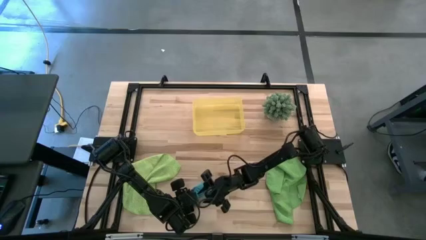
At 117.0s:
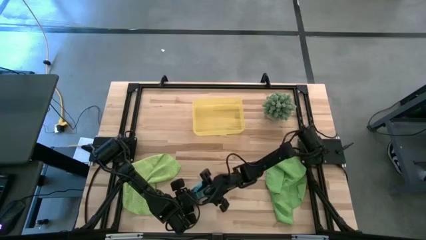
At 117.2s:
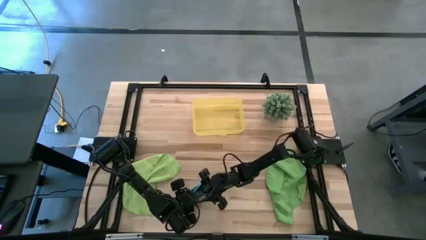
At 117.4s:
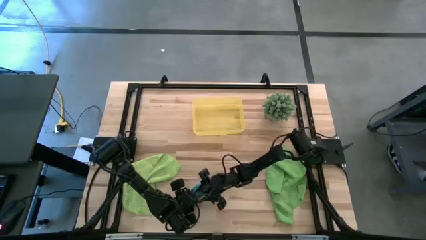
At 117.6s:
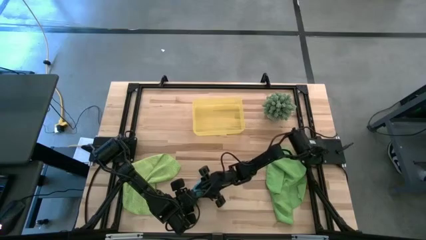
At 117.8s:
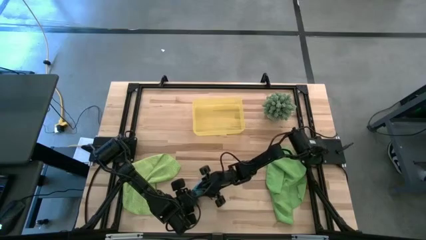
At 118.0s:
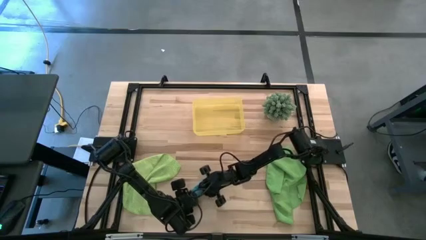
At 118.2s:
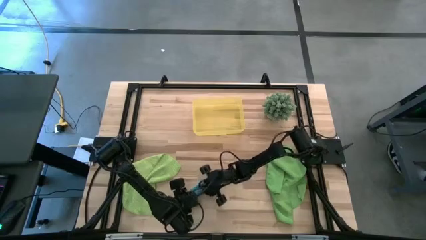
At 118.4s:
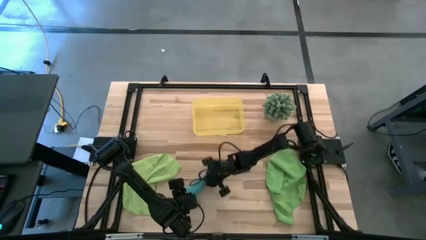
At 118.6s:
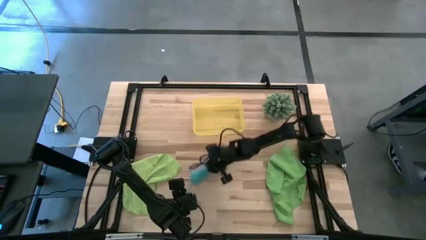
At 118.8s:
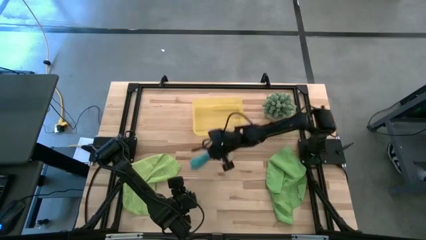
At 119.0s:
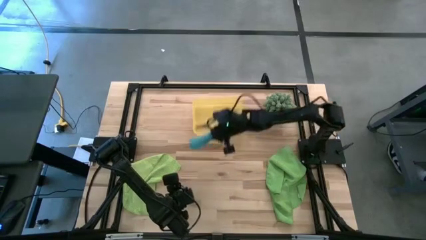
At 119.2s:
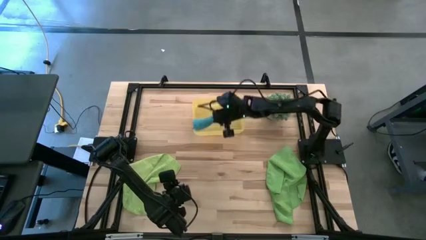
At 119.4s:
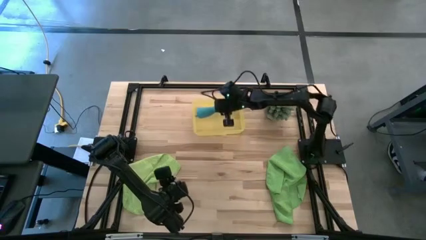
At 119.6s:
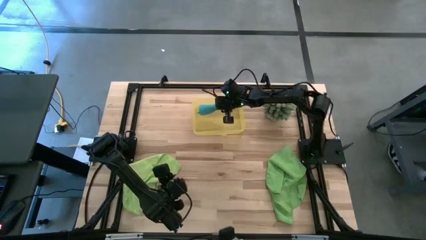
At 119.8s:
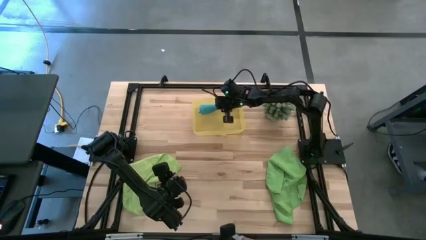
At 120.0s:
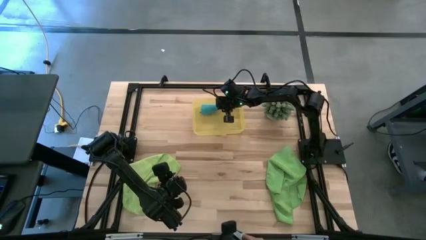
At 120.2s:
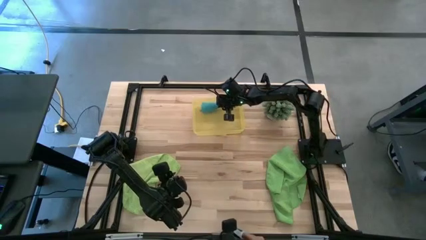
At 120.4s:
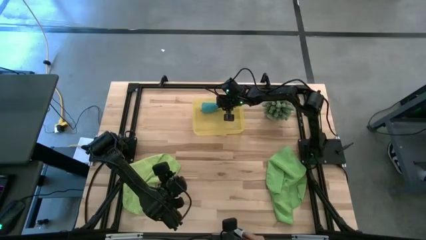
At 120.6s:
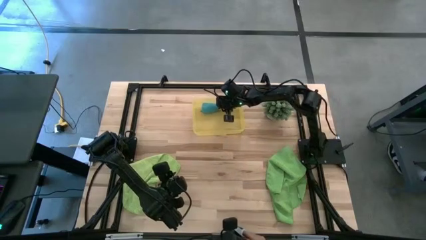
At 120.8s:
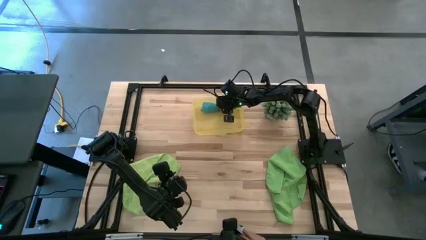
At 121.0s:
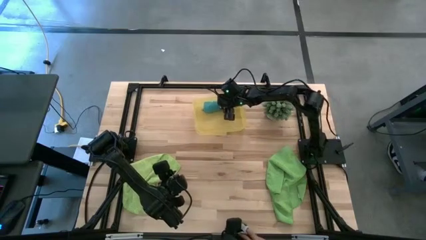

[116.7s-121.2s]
Task: Roll microfiber towels into tight, uniform cylinder then place into a basket
Put the blue microfiber cloth into the yellow bin

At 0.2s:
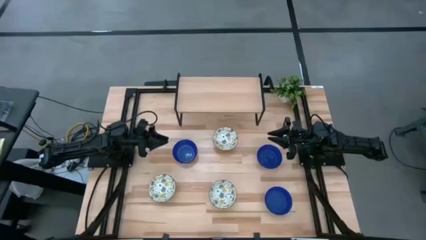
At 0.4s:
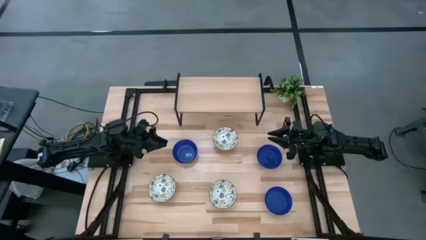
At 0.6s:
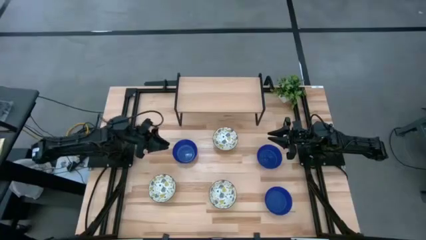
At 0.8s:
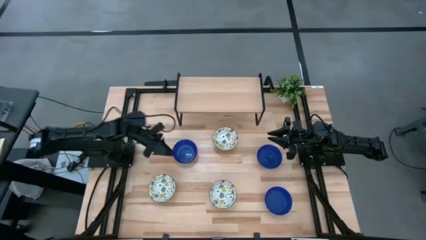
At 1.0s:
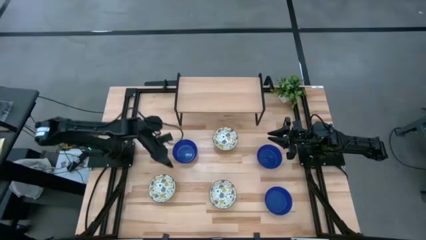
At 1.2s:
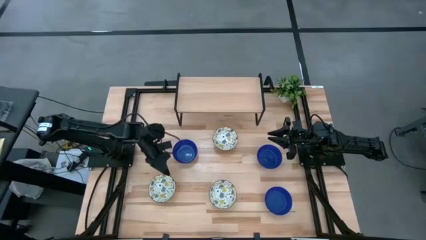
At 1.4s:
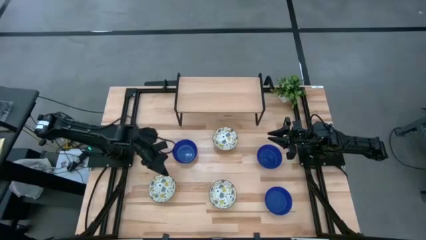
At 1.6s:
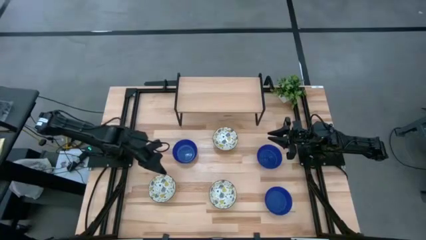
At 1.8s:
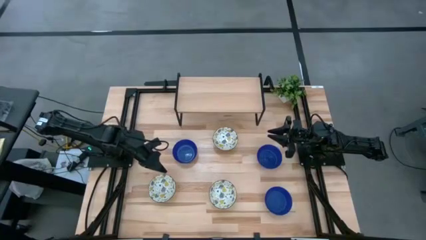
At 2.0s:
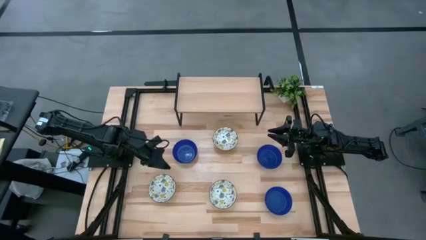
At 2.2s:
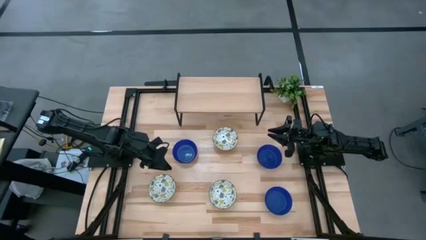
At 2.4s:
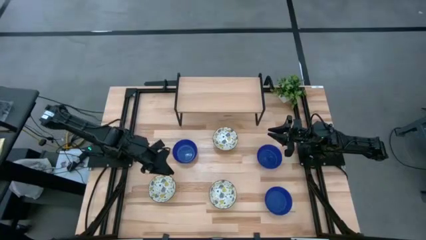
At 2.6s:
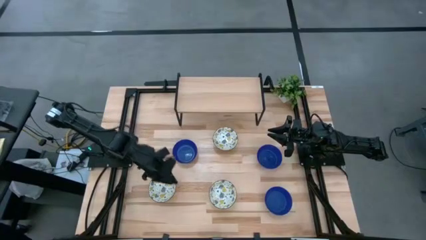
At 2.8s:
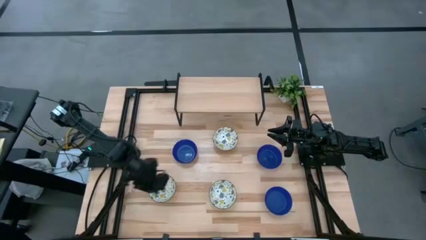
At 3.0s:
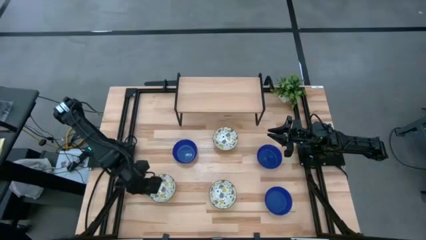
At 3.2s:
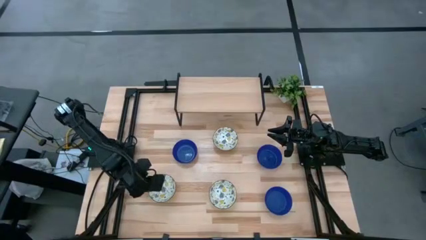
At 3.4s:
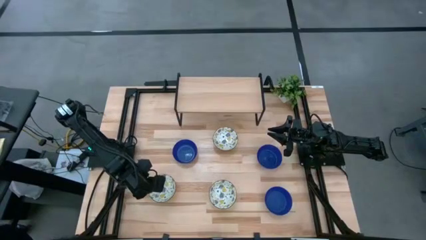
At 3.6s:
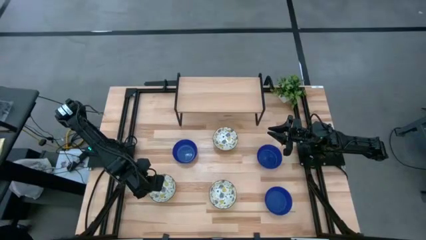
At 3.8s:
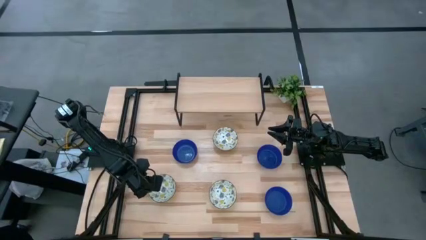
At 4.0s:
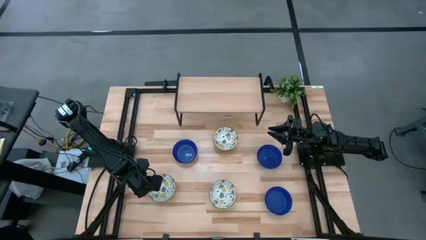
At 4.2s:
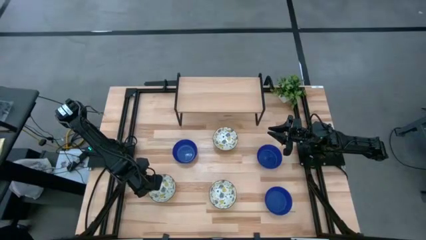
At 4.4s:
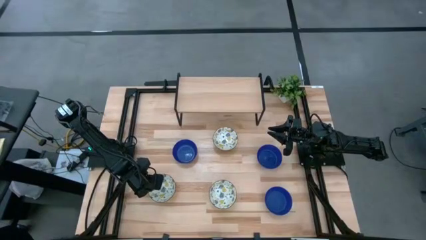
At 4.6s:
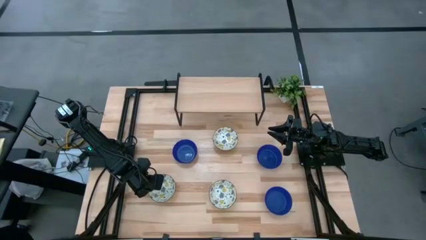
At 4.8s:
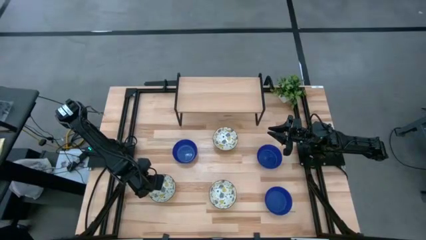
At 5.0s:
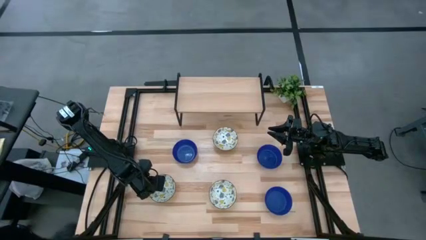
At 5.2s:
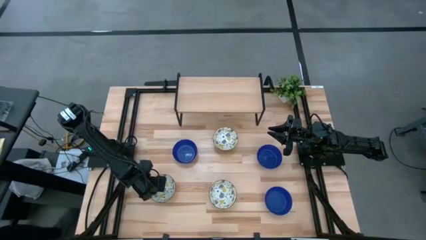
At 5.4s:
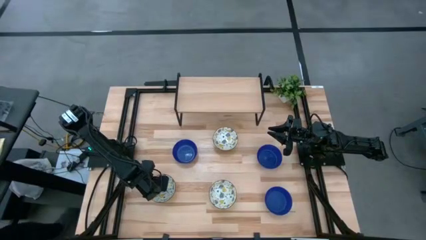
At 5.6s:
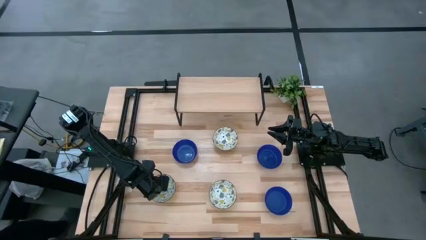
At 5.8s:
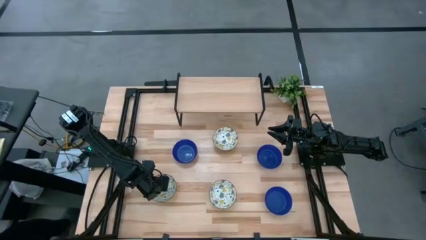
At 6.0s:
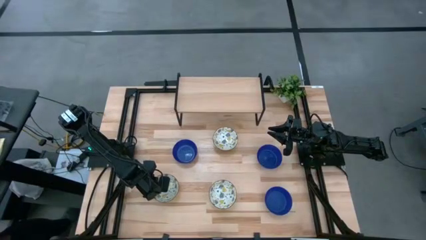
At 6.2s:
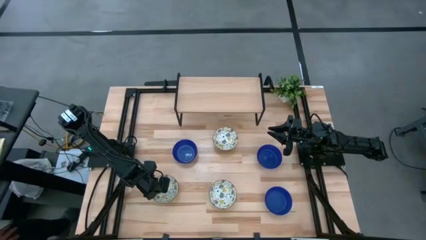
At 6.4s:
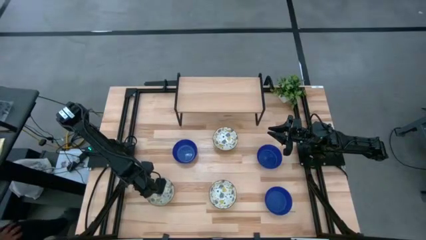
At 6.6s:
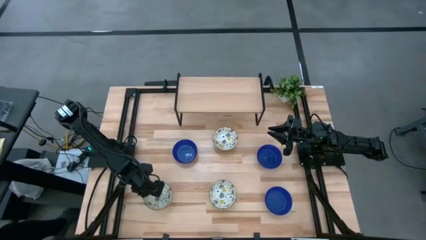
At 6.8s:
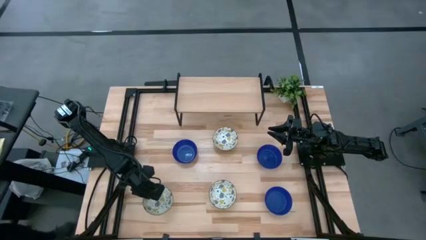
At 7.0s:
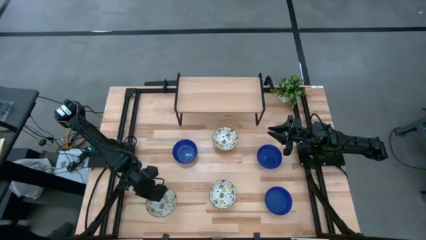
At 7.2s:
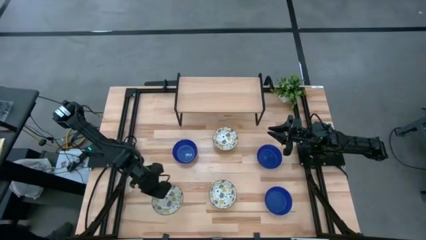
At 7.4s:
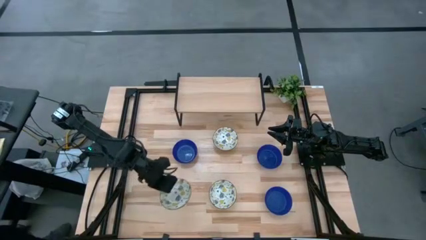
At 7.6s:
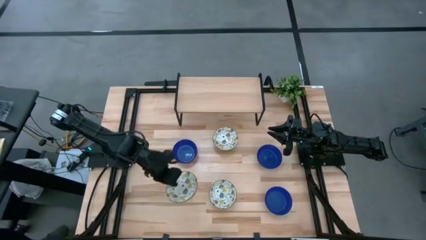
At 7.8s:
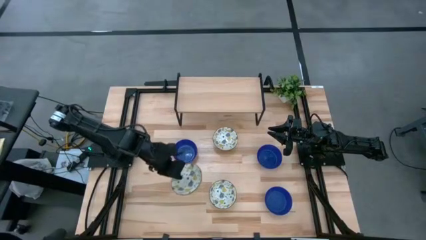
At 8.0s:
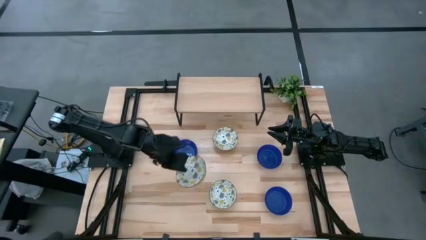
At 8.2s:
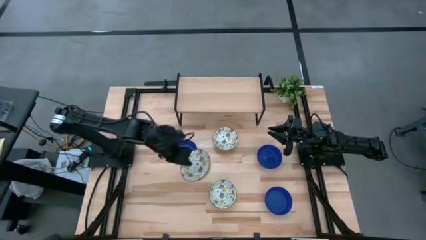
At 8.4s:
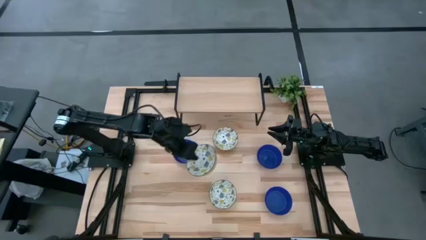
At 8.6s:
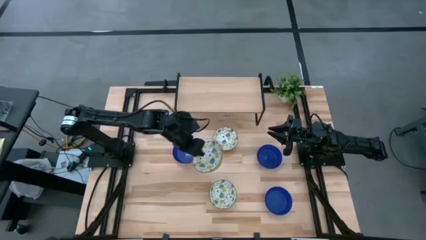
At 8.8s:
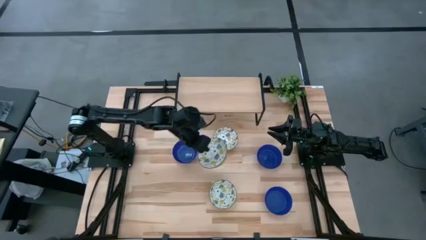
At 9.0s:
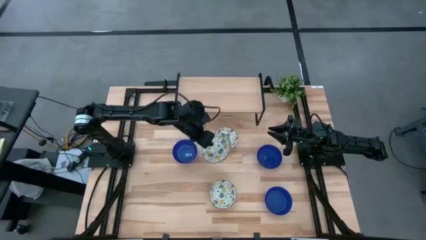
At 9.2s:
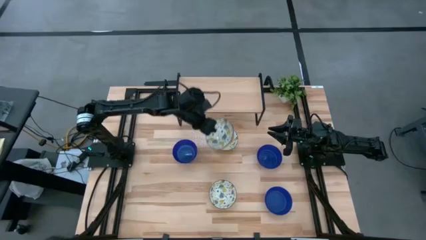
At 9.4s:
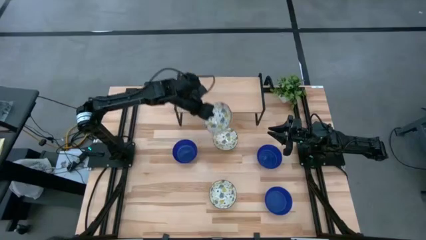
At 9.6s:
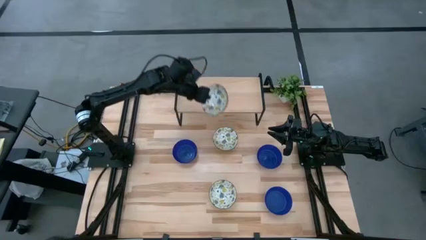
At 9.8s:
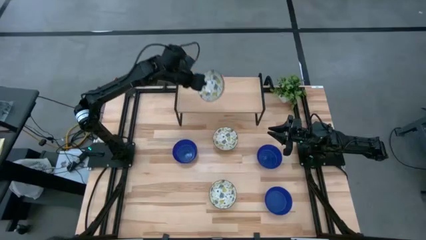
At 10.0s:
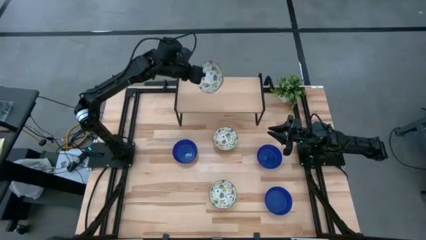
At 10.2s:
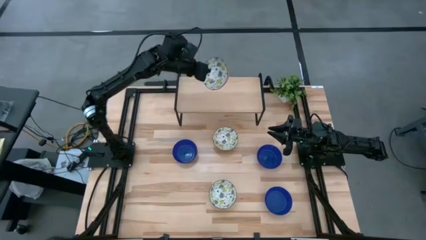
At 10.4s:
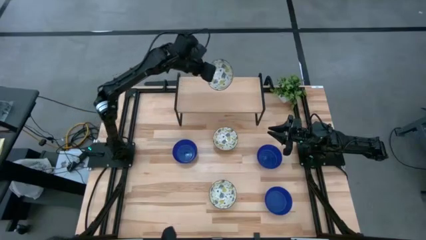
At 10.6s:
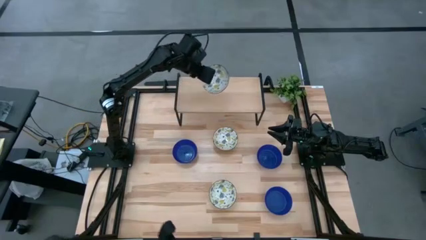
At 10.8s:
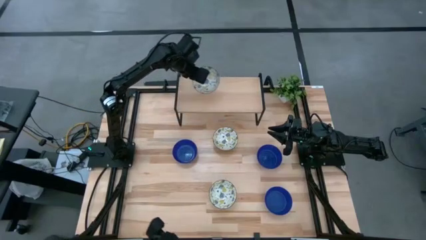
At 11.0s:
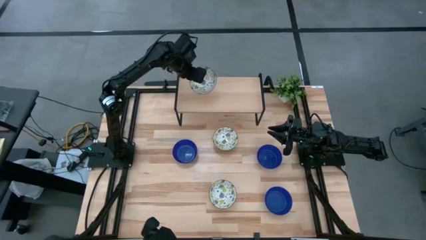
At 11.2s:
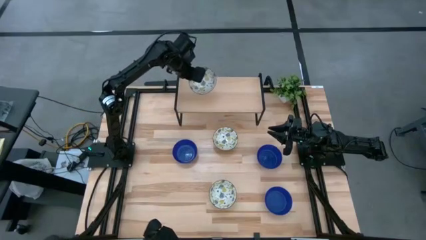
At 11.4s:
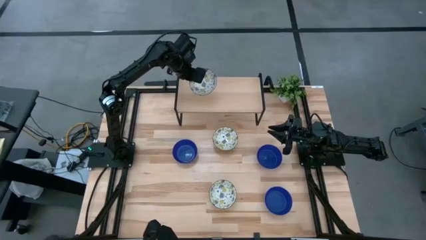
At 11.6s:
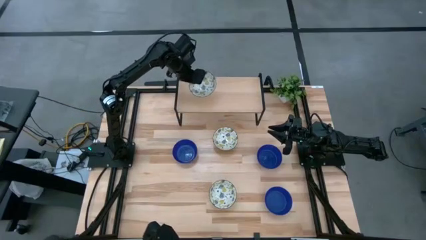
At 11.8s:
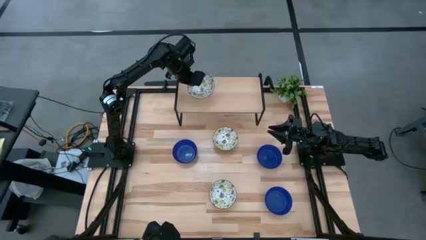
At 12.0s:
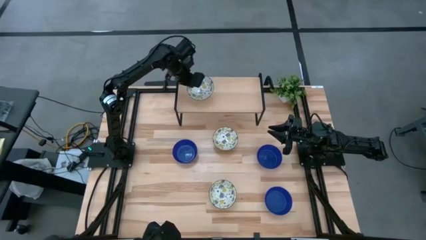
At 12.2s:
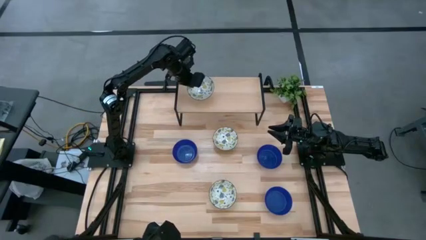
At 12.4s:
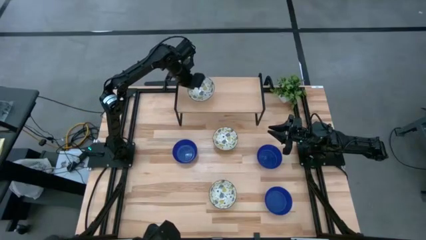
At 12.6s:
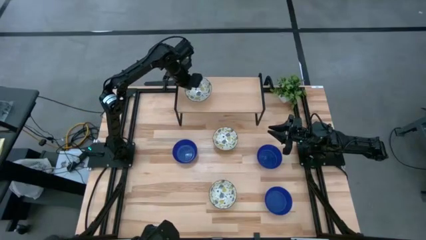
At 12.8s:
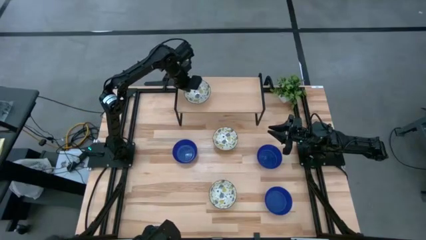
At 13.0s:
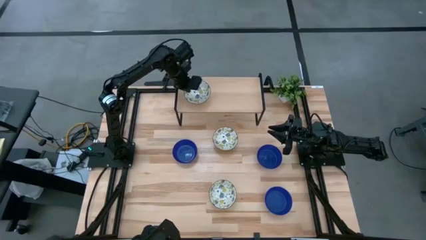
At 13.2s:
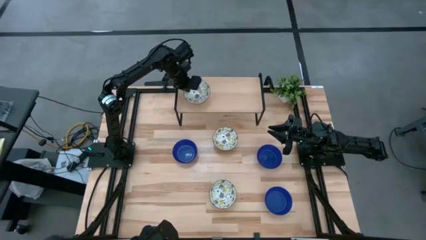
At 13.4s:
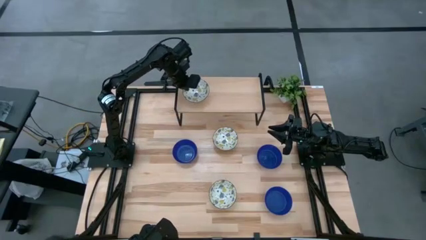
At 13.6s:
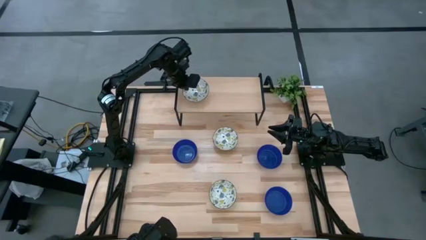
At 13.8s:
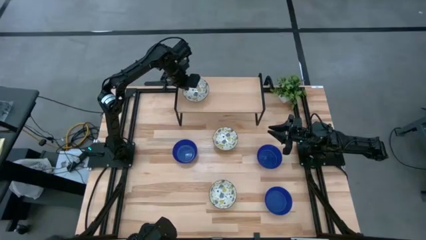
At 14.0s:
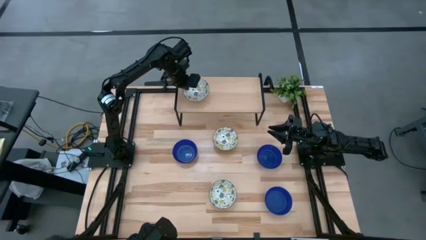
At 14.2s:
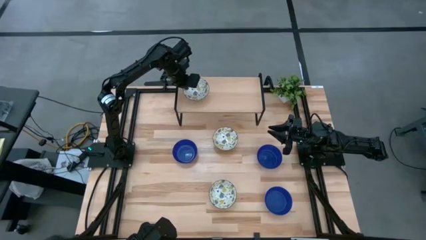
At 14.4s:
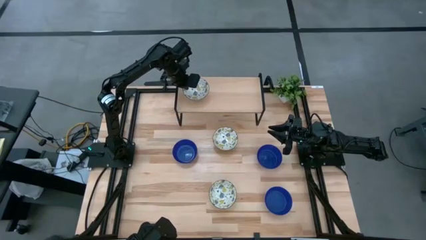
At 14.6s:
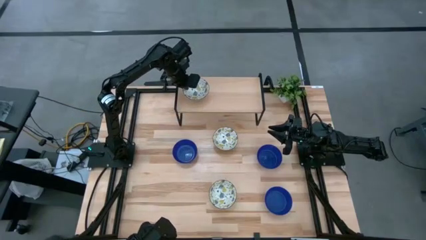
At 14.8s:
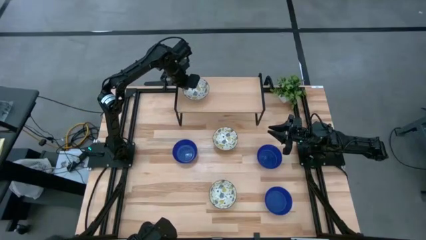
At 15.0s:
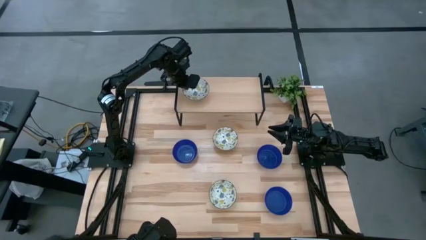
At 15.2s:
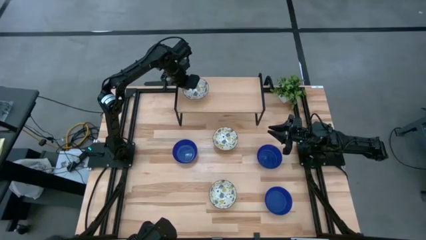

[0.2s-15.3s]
Task: Pick & Place Mini bowls
Put the bottom left yellow bowl on the shelf
